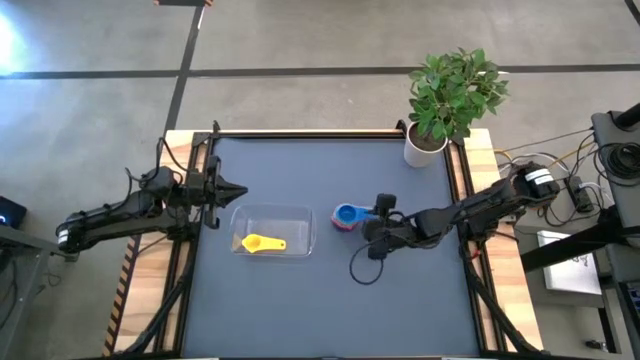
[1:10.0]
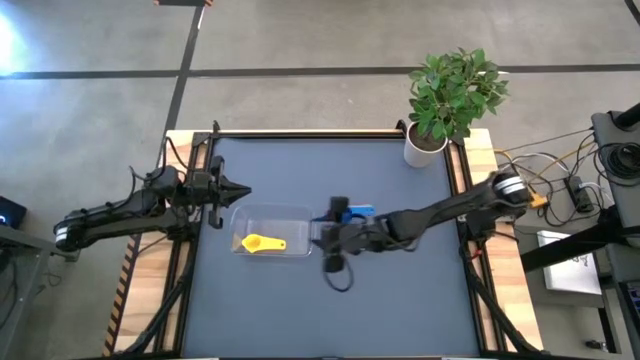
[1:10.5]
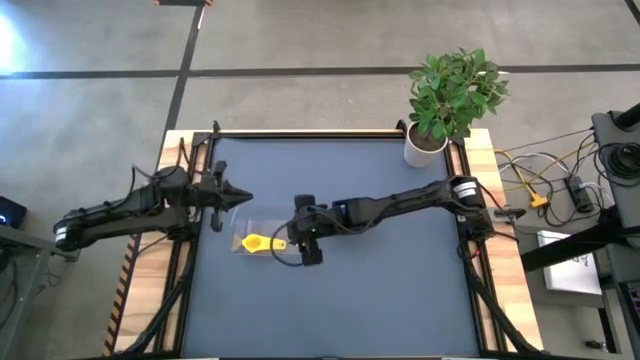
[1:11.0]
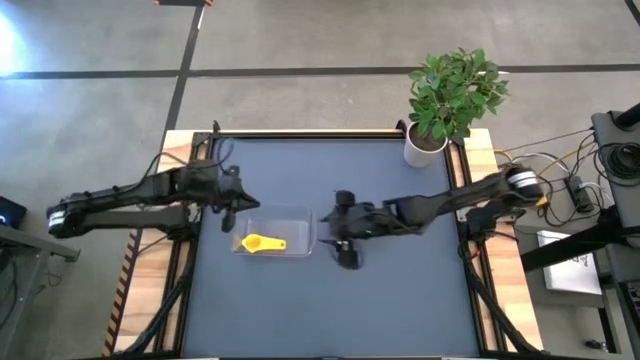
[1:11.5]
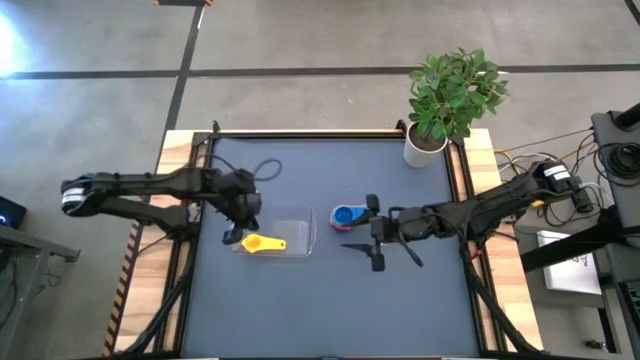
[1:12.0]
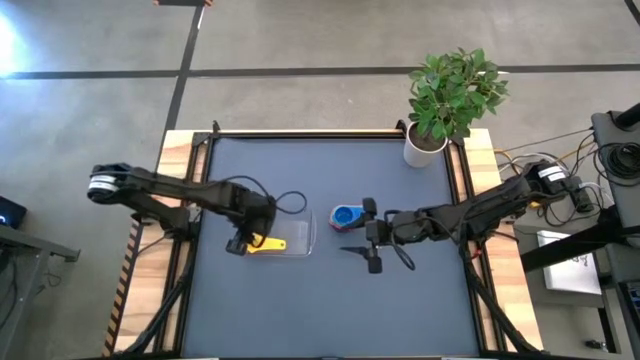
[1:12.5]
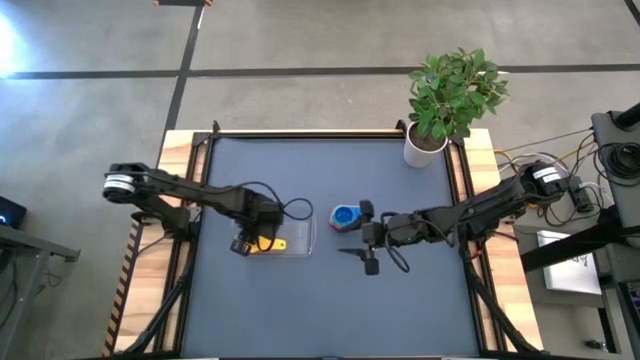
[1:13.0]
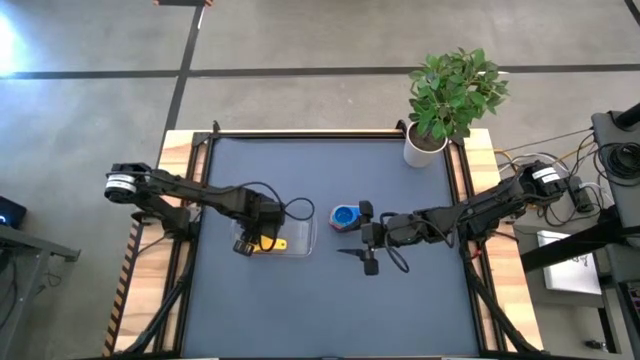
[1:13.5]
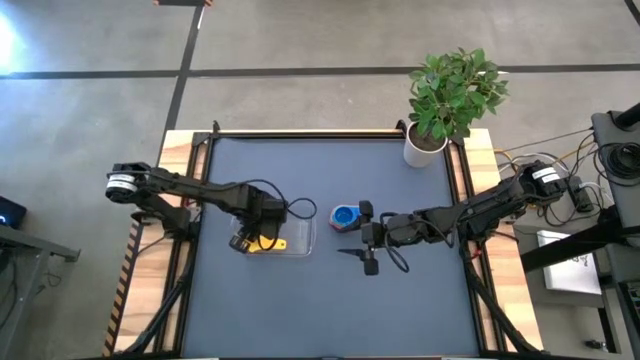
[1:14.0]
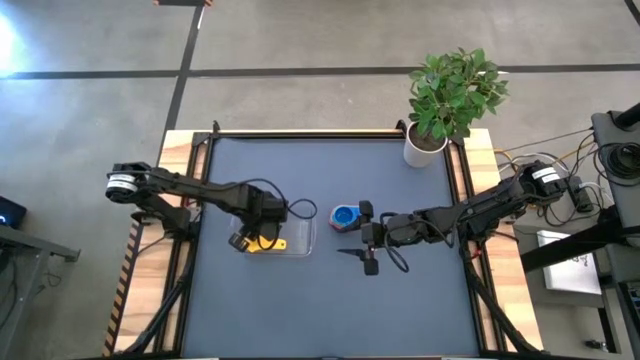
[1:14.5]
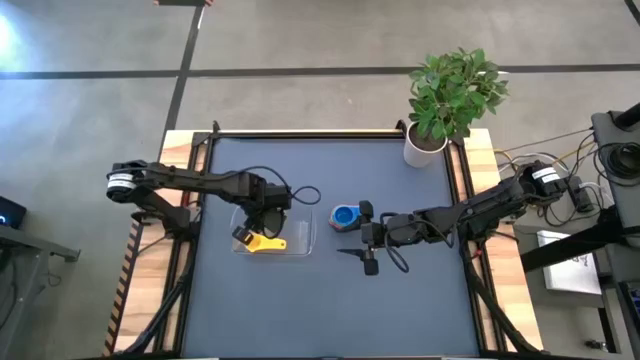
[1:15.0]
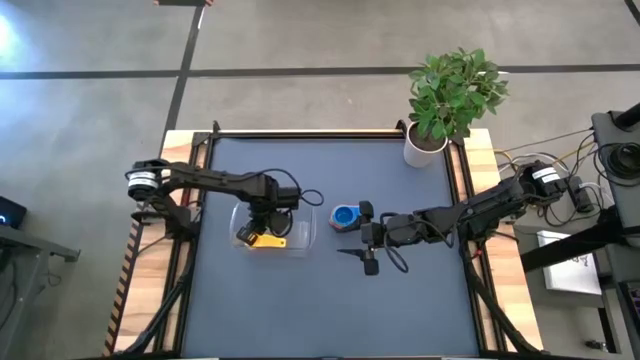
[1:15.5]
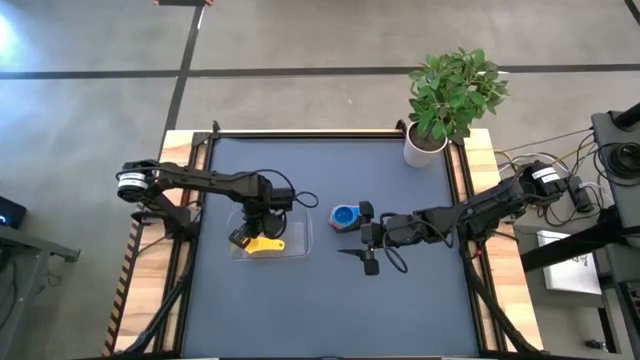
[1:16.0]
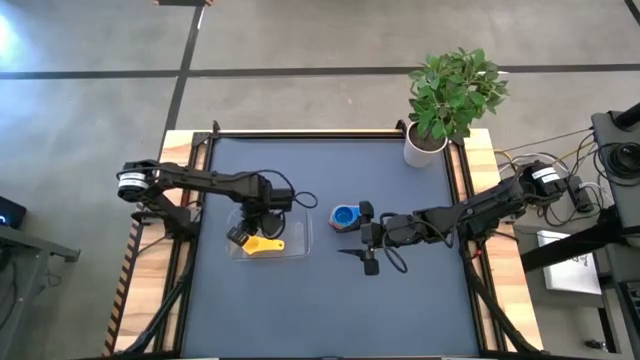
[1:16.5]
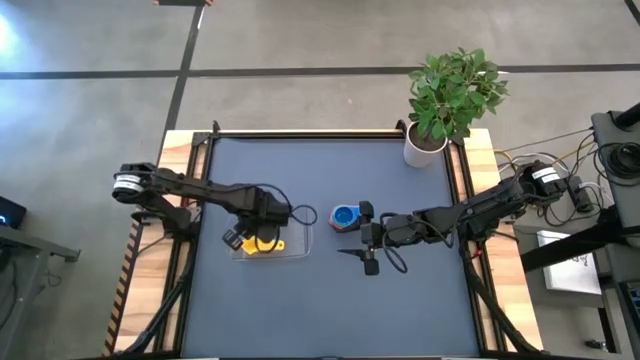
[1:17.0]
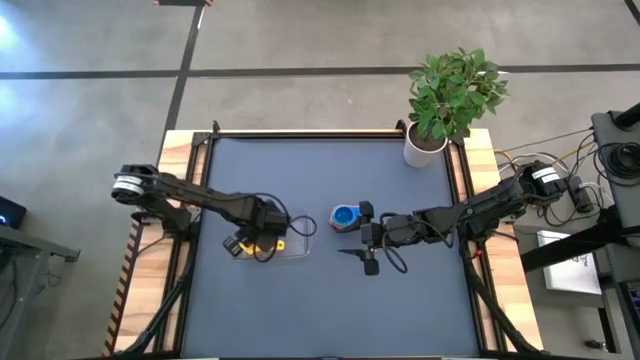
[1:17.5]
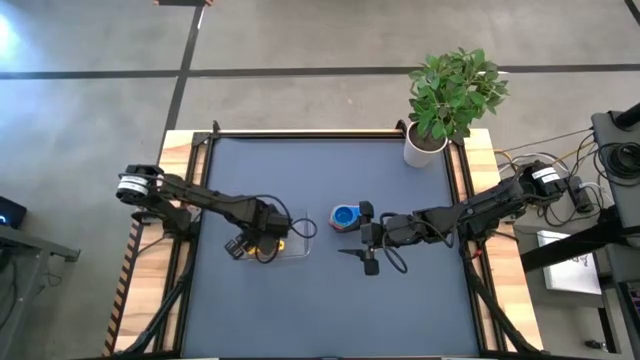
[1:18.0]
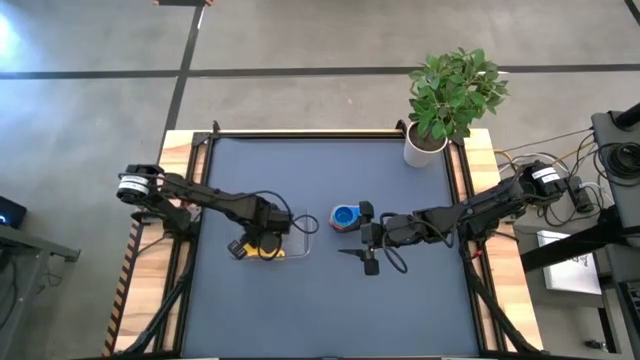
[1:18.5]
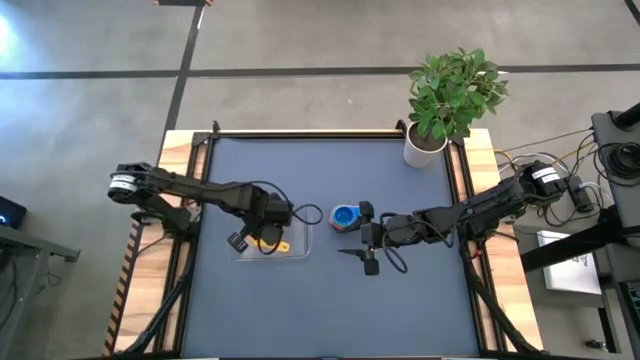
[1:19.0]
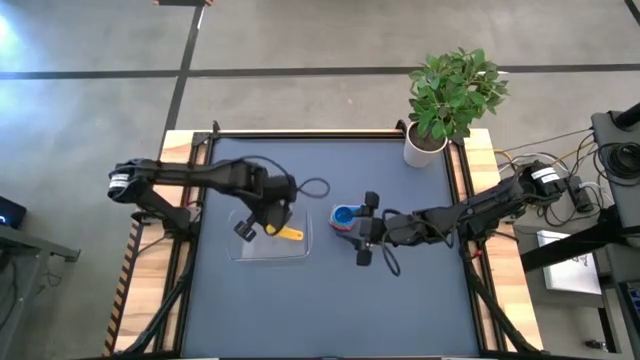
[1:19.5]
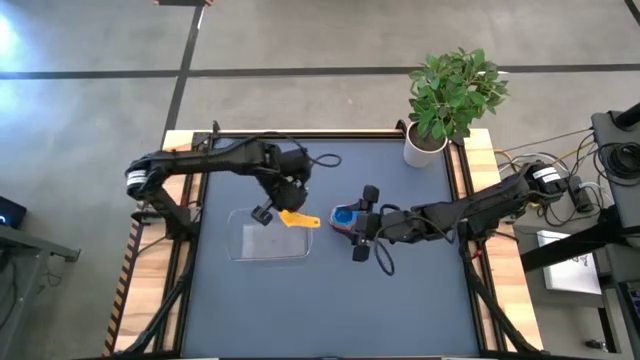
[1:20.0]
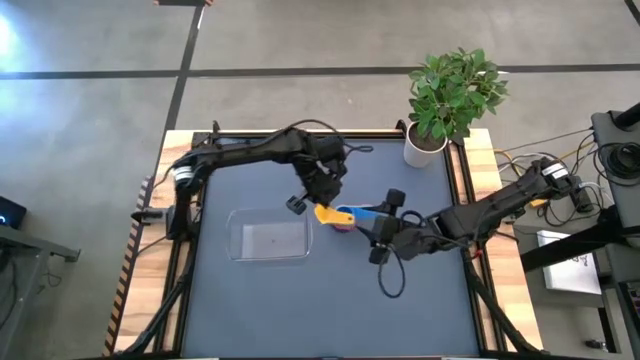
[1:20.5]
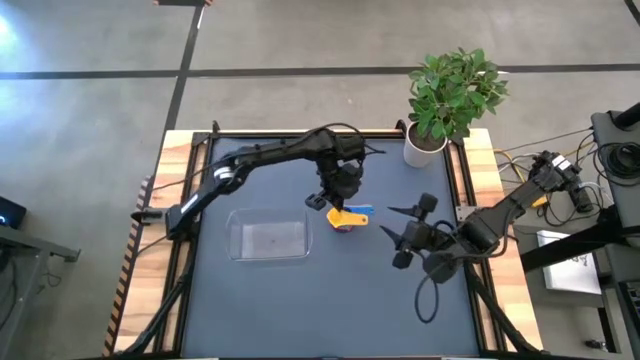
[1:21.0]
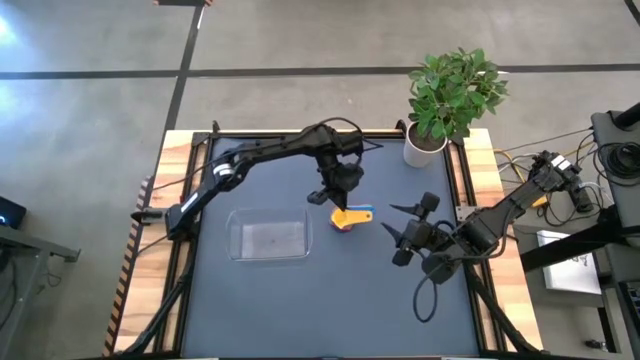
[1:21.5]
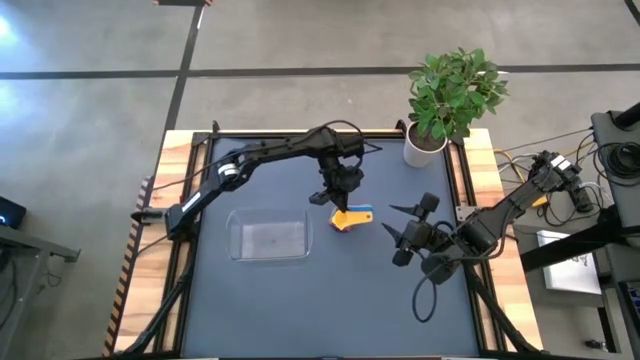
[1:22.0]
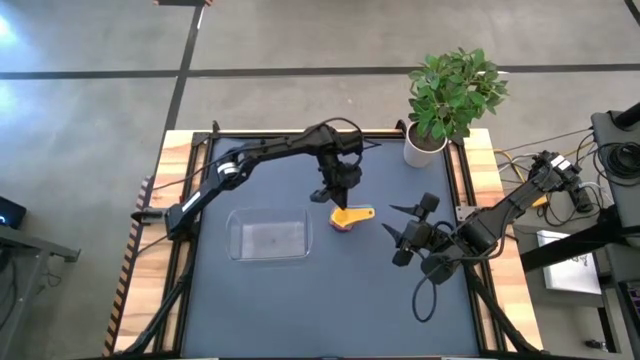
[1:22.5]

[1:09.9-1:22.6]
Task: Nest measuring cups in basket
Stack the yellow measuring cup on the top of the blue measuring cup

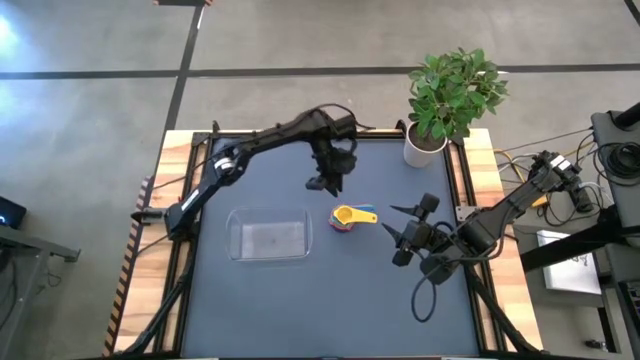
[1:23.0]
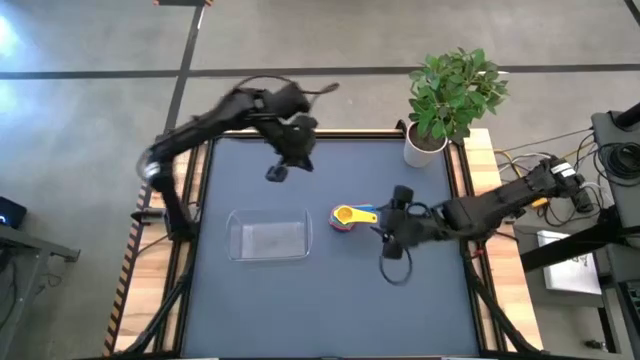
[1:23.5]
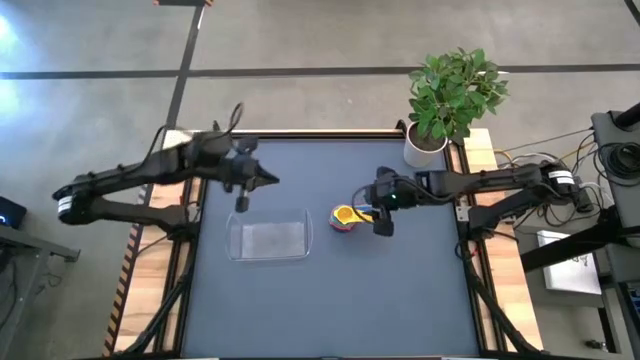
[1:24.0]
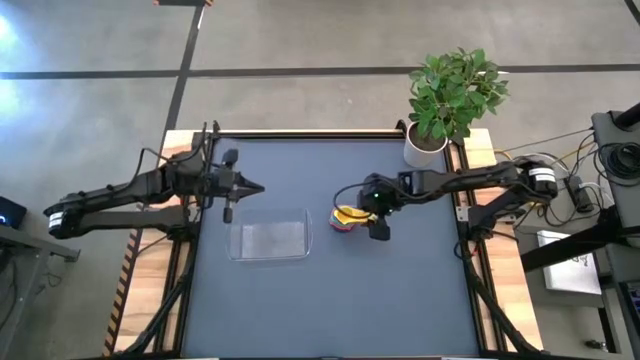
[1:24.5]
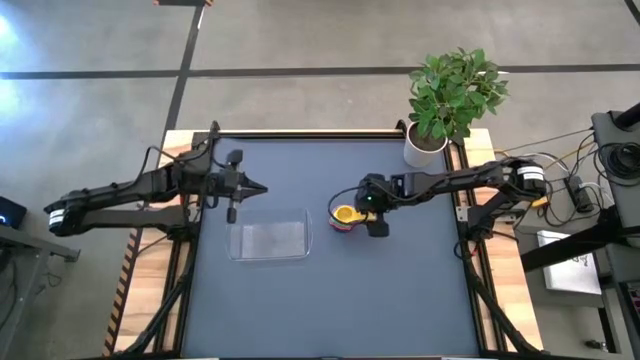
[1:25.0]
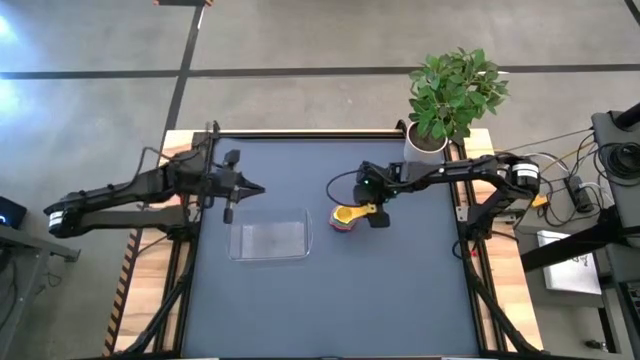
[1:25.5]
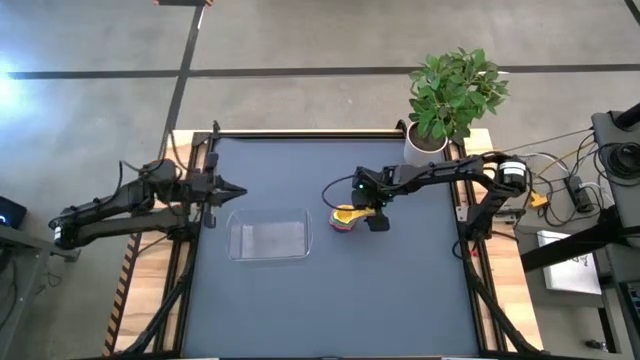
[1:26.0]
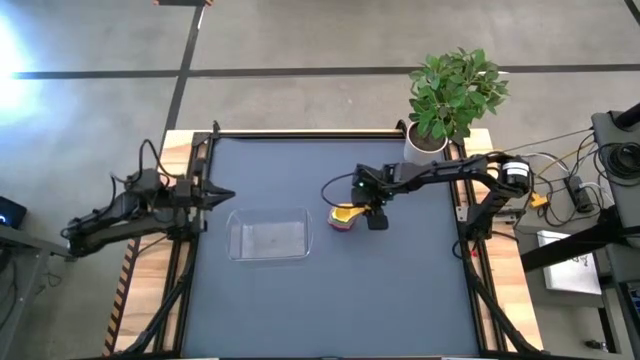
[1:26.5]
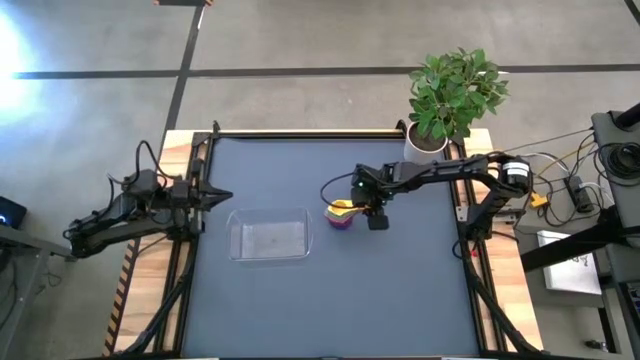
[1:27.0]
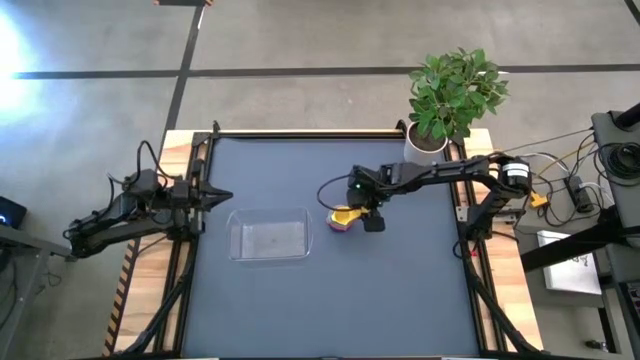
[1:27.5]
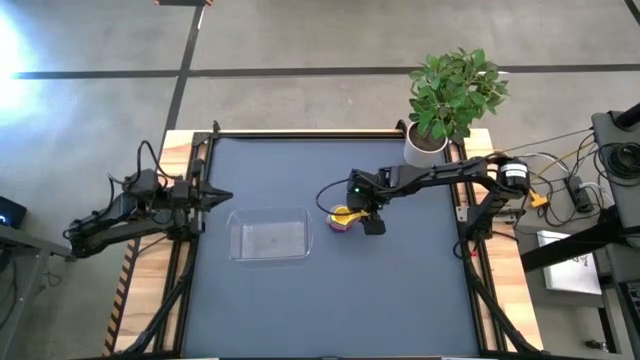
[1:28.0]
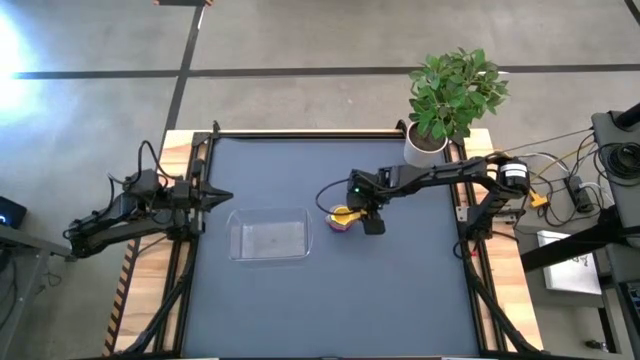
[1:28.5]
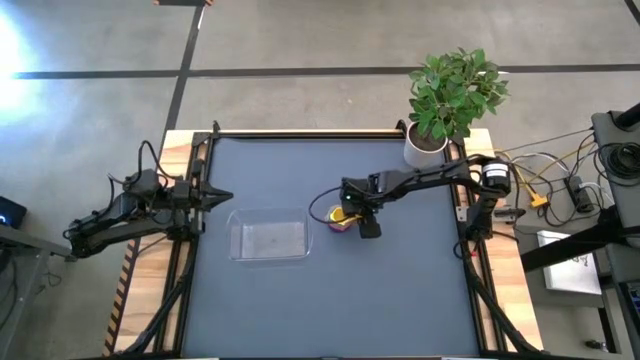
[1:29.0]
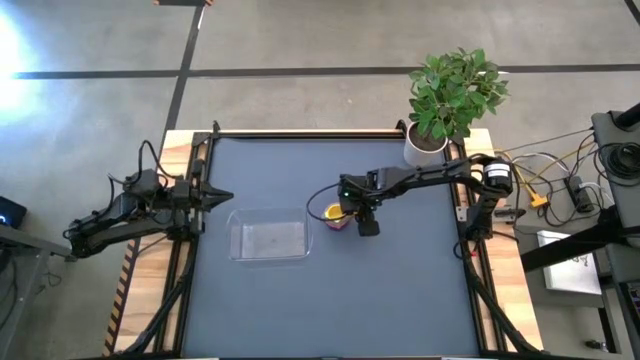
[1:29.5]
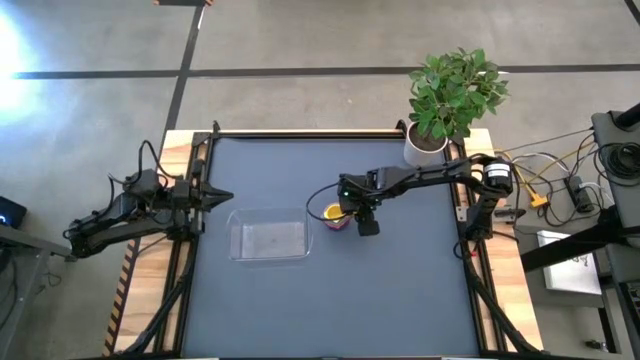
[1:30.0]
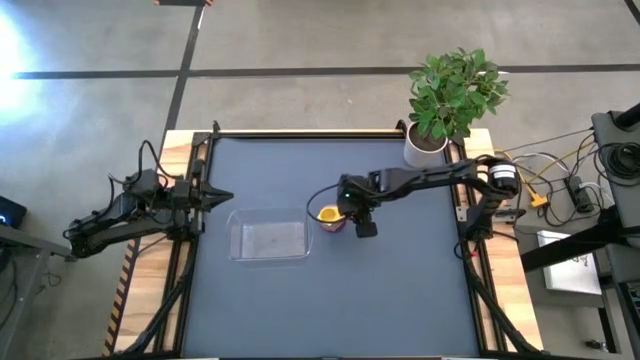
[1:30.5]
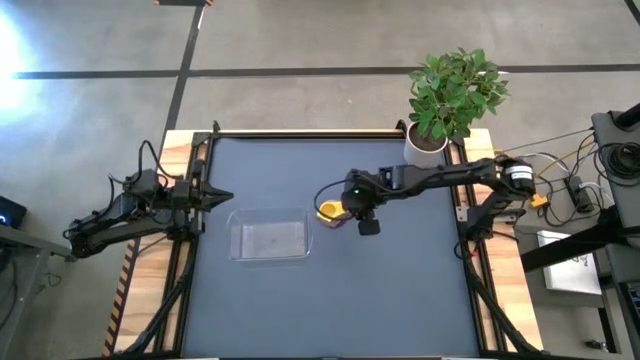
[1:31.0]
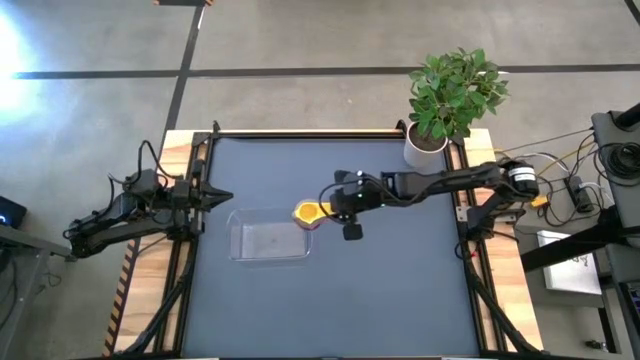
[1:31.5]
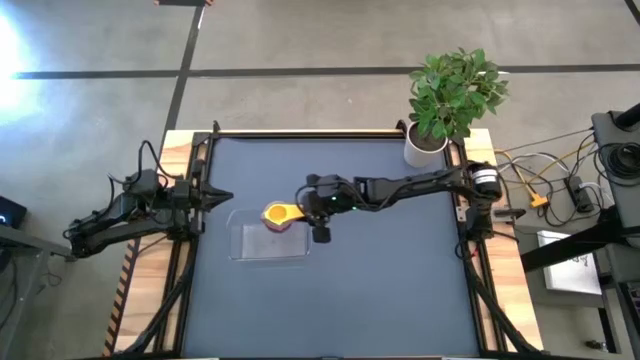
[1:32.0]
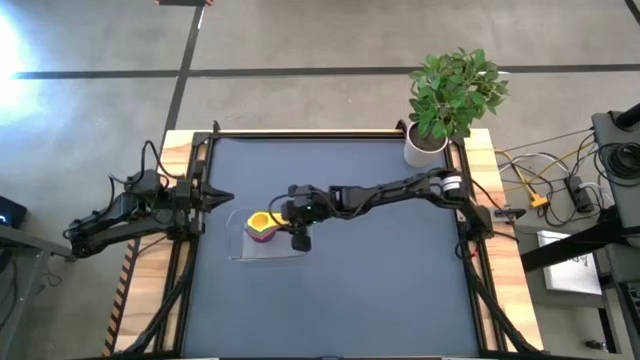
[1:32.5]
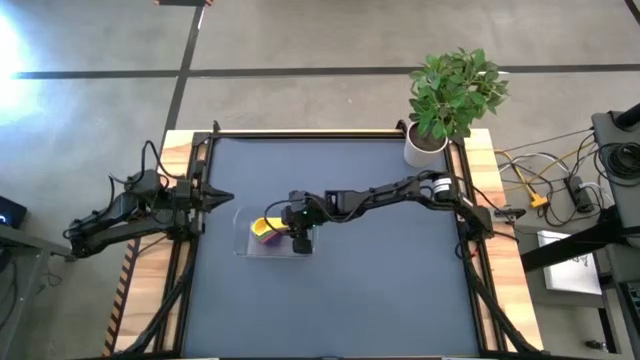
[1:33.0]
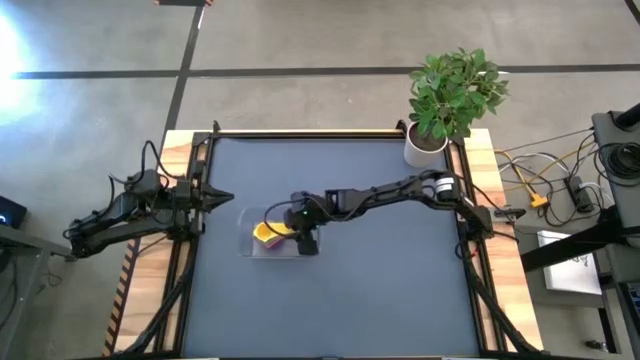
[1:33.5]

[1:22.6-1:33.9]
Put the stacked measuring cups into the transparent bin
